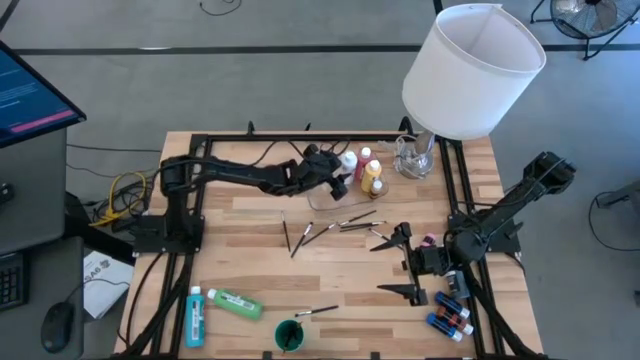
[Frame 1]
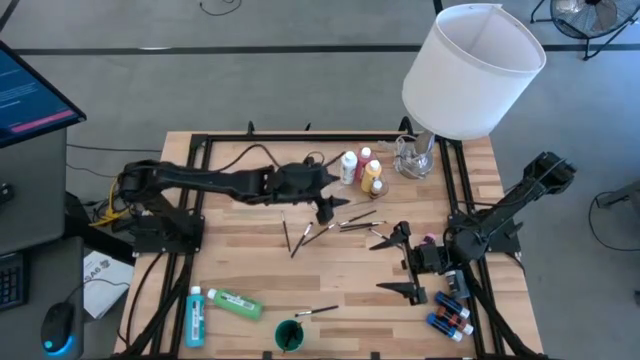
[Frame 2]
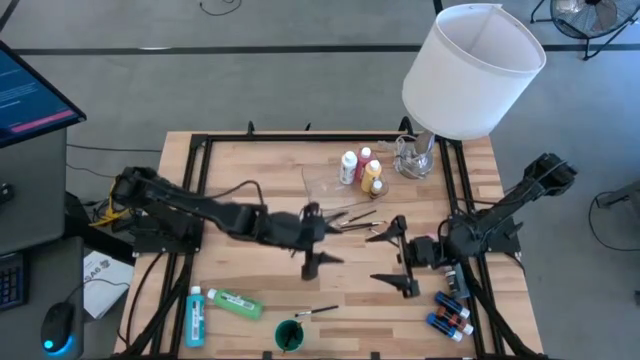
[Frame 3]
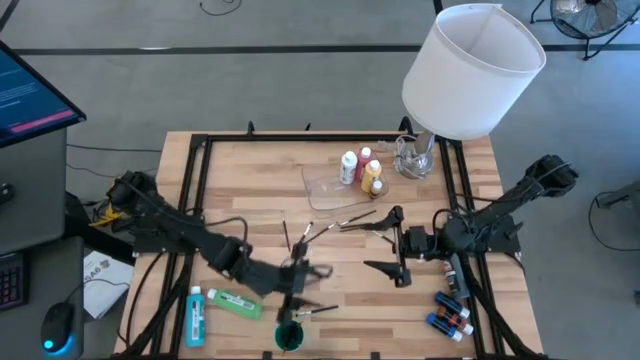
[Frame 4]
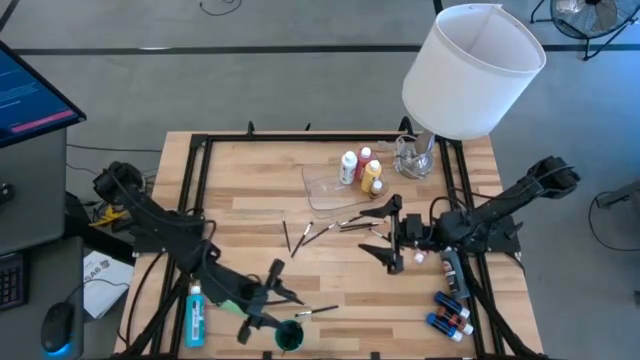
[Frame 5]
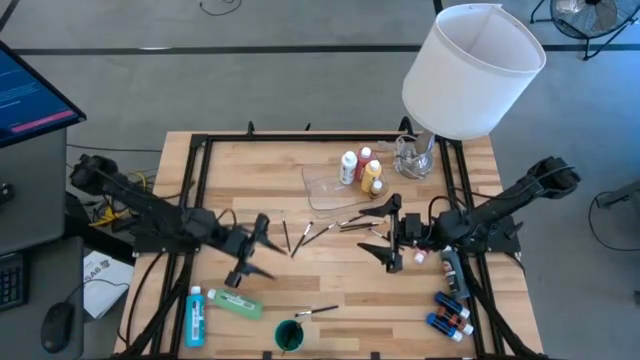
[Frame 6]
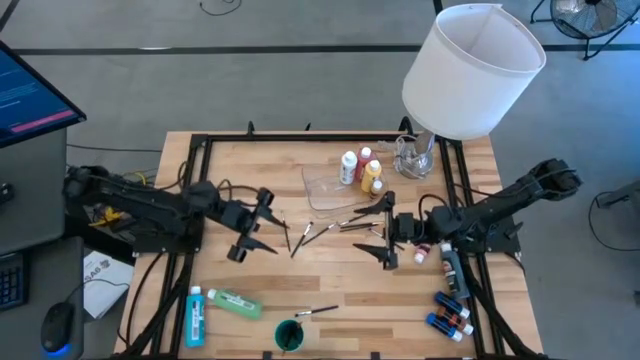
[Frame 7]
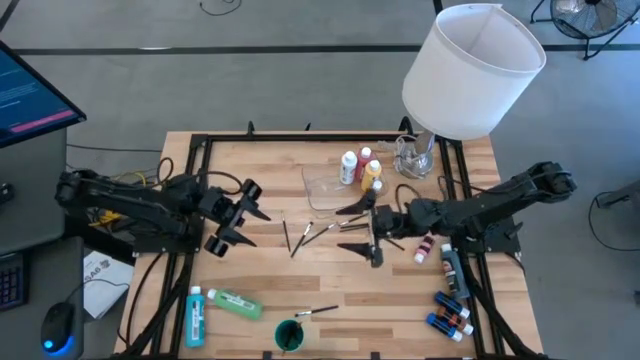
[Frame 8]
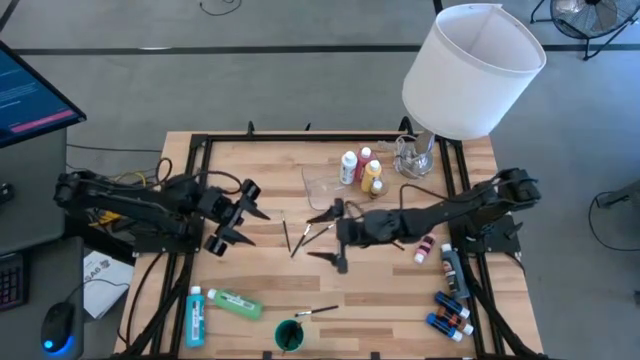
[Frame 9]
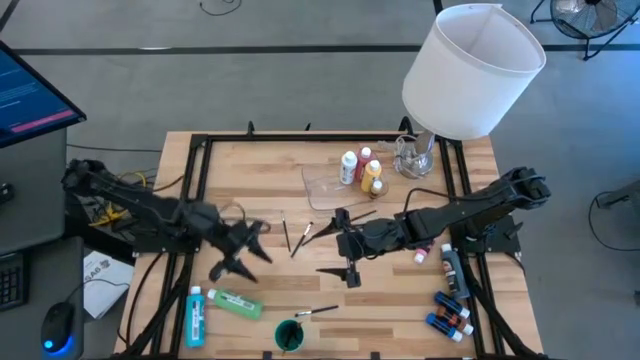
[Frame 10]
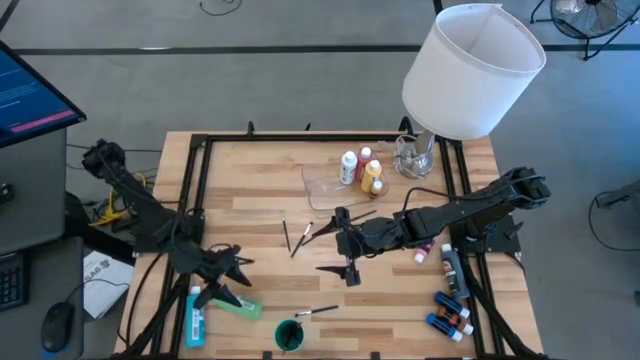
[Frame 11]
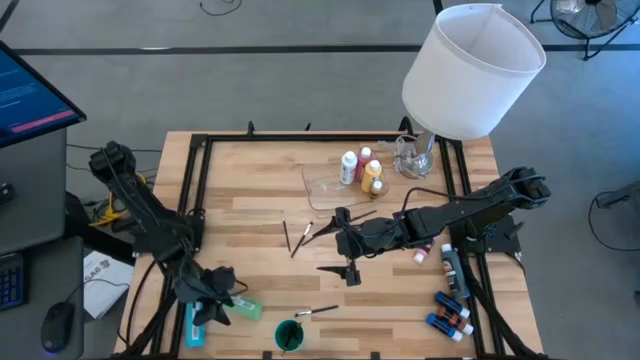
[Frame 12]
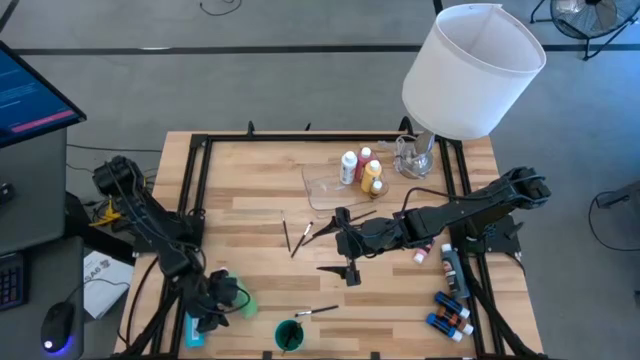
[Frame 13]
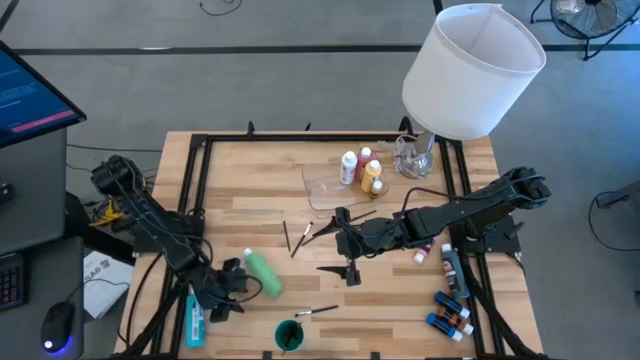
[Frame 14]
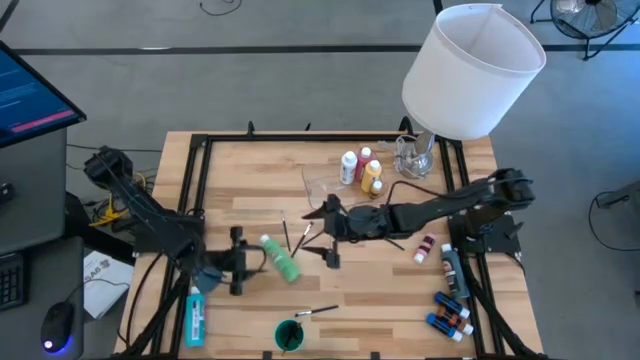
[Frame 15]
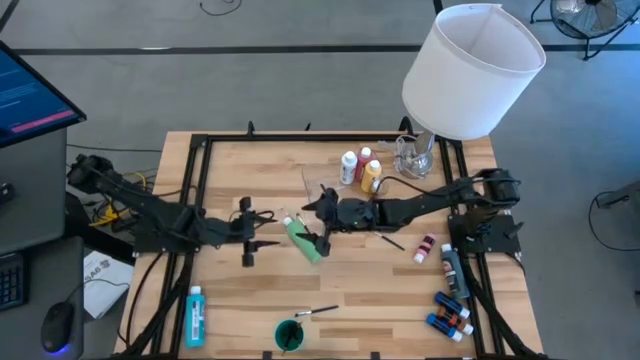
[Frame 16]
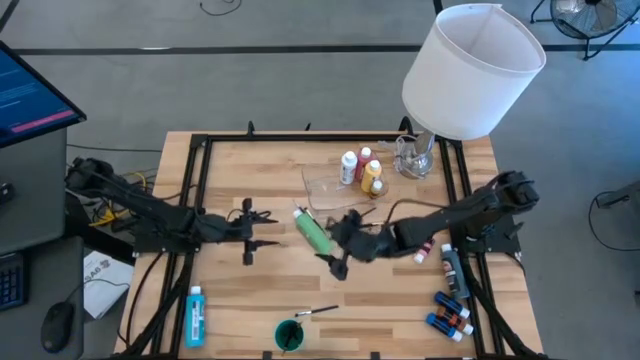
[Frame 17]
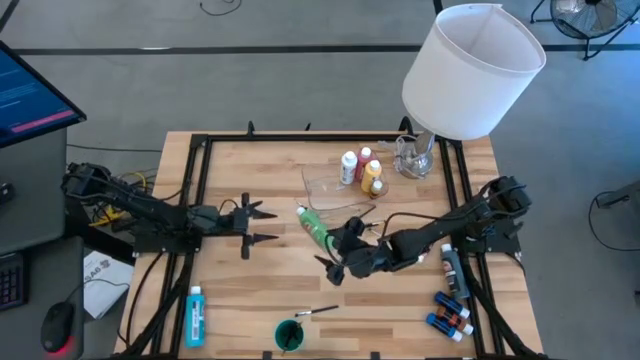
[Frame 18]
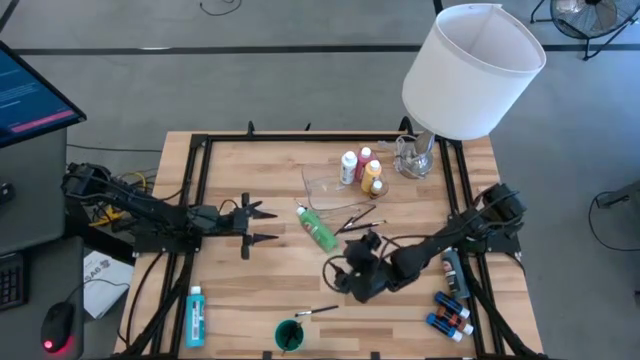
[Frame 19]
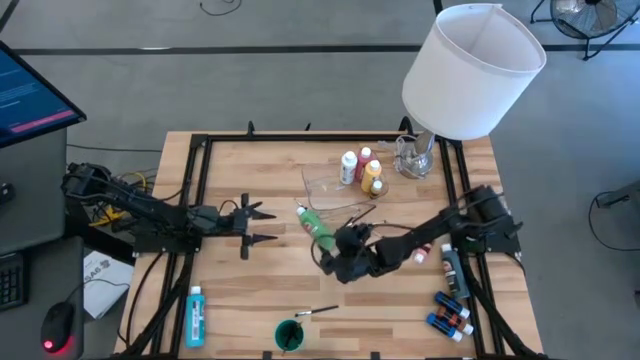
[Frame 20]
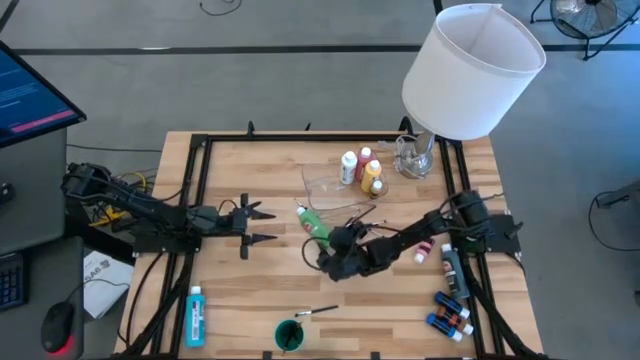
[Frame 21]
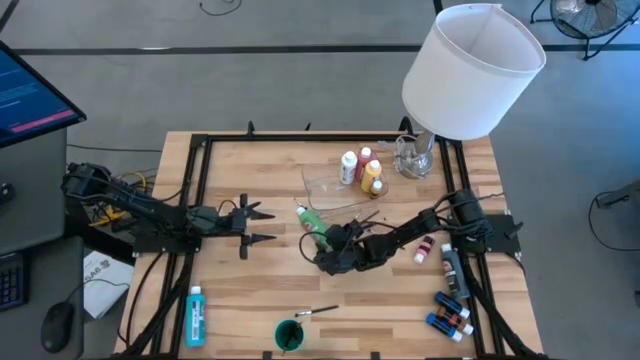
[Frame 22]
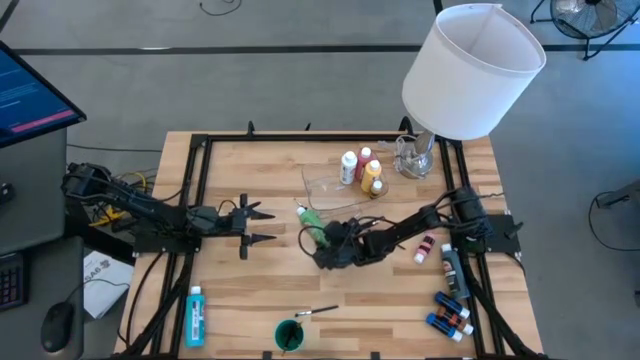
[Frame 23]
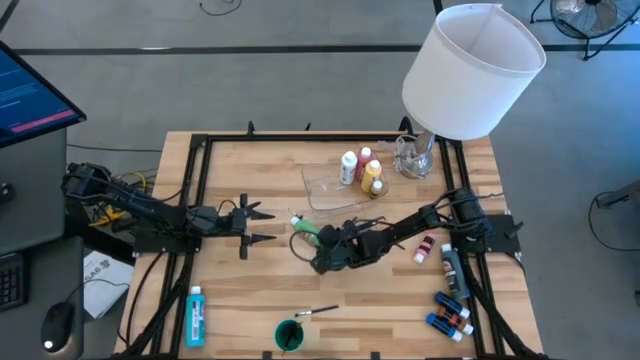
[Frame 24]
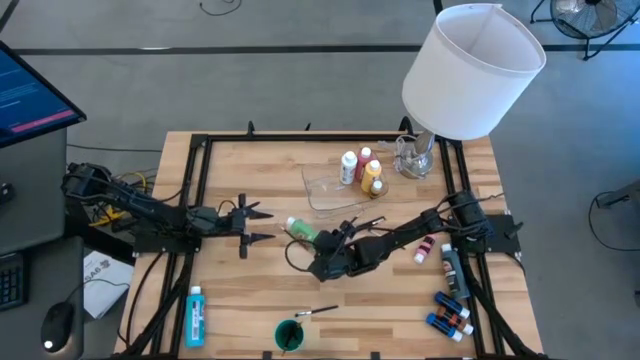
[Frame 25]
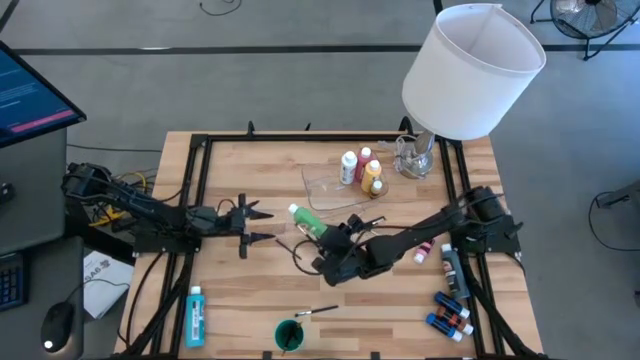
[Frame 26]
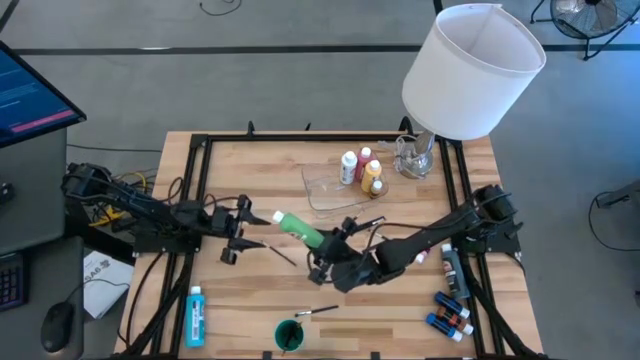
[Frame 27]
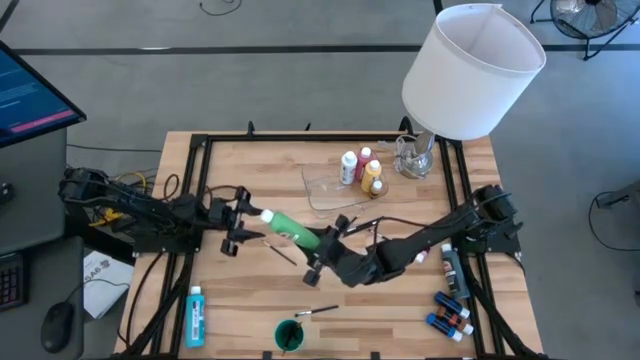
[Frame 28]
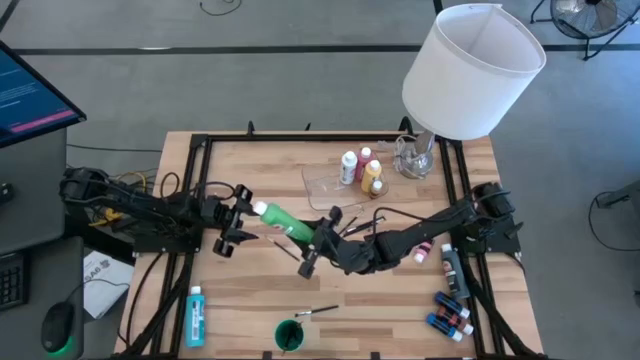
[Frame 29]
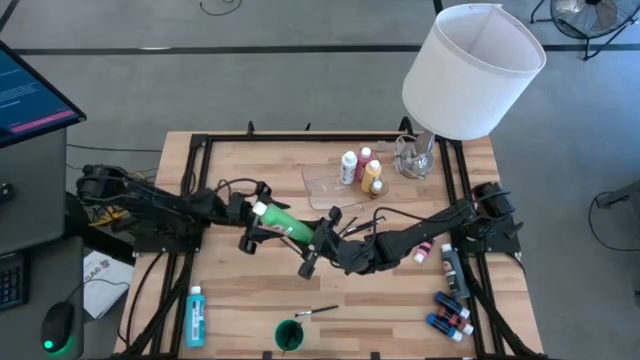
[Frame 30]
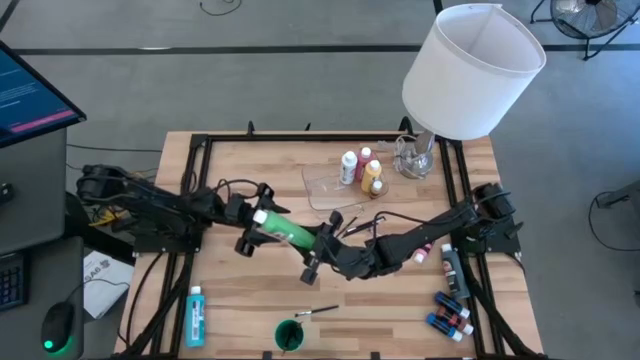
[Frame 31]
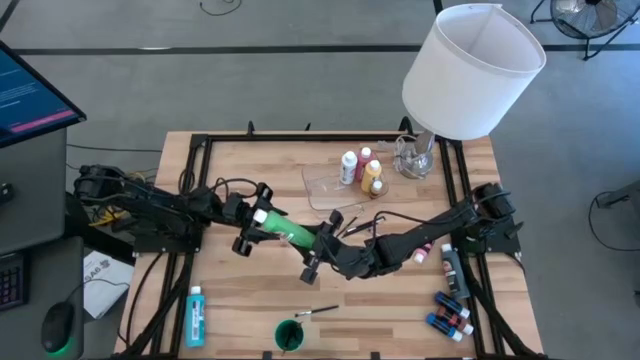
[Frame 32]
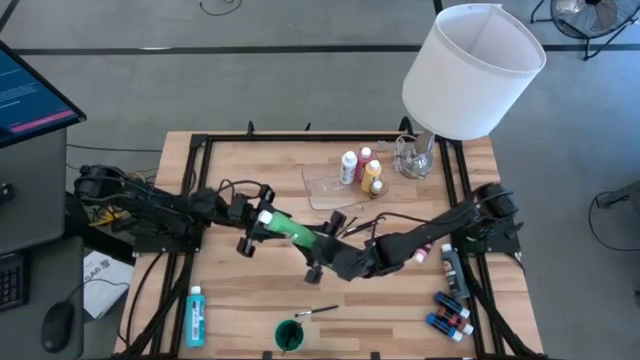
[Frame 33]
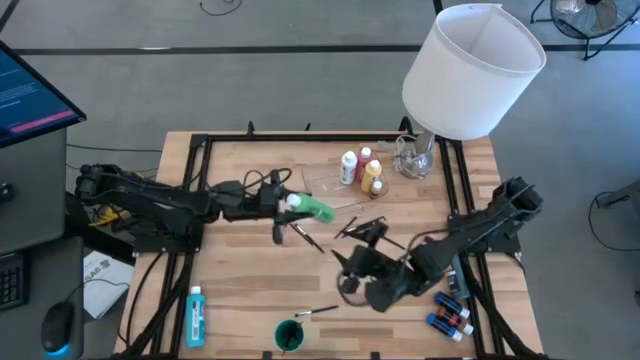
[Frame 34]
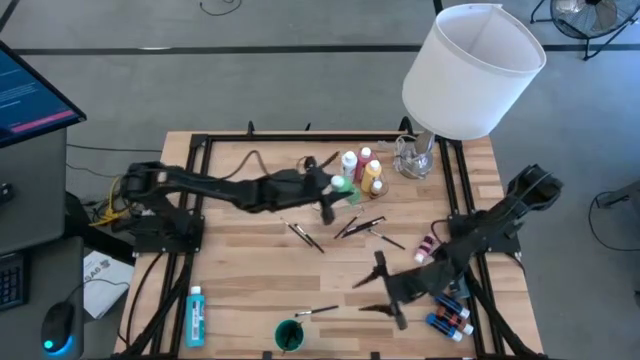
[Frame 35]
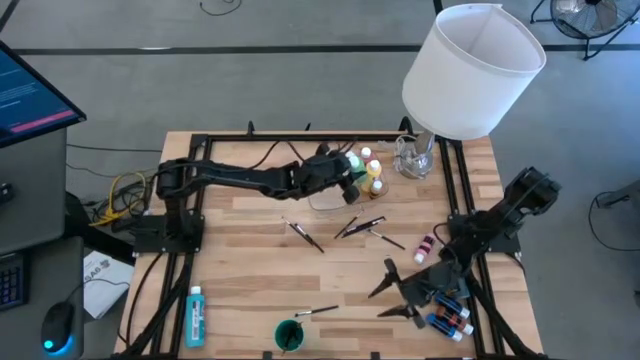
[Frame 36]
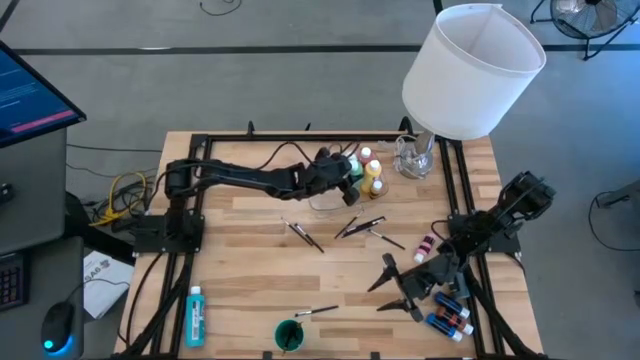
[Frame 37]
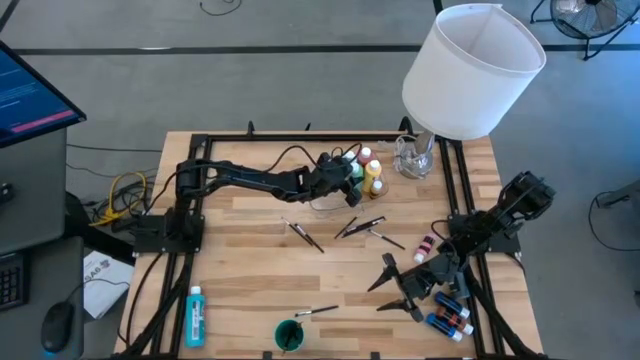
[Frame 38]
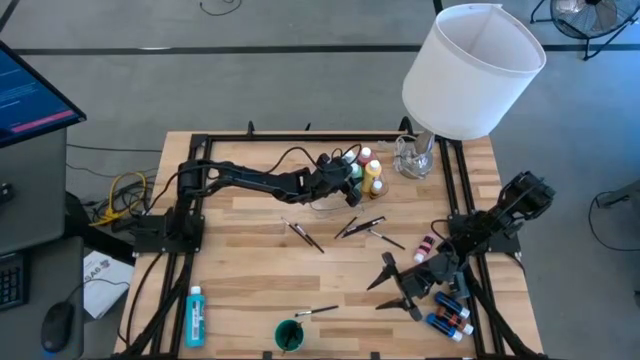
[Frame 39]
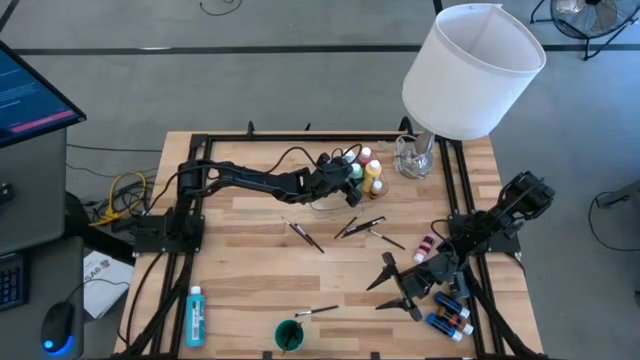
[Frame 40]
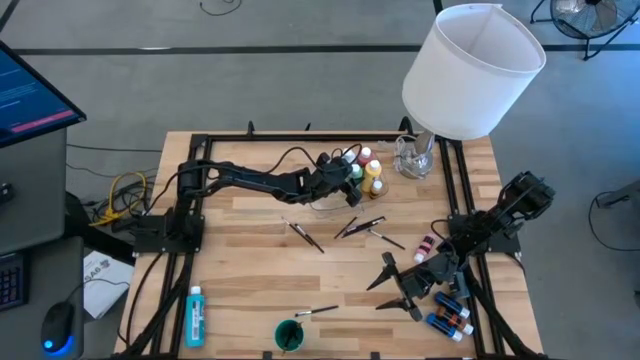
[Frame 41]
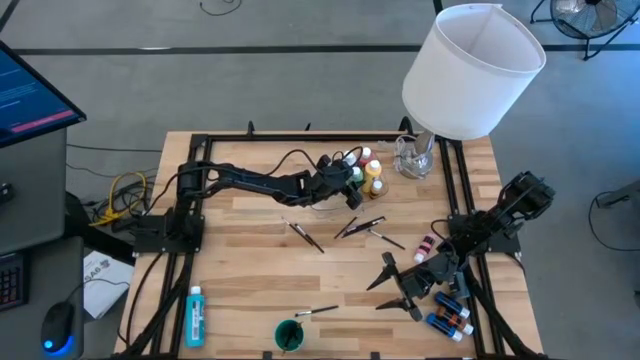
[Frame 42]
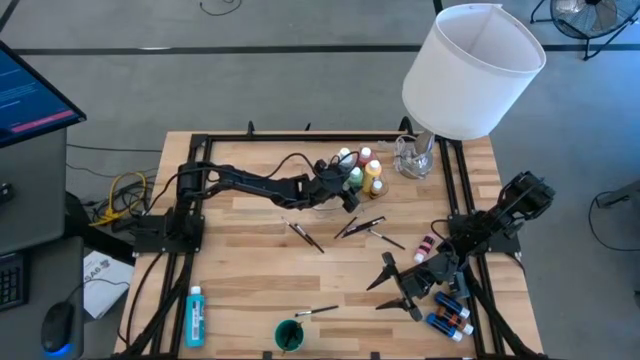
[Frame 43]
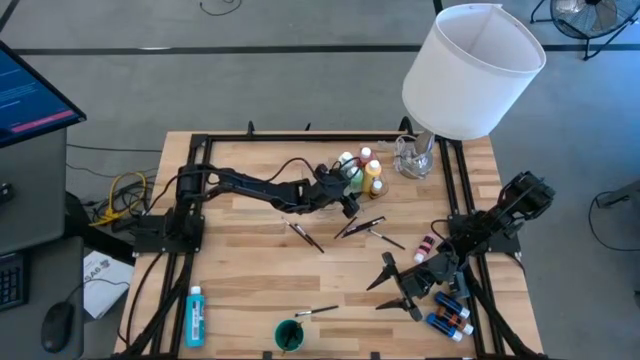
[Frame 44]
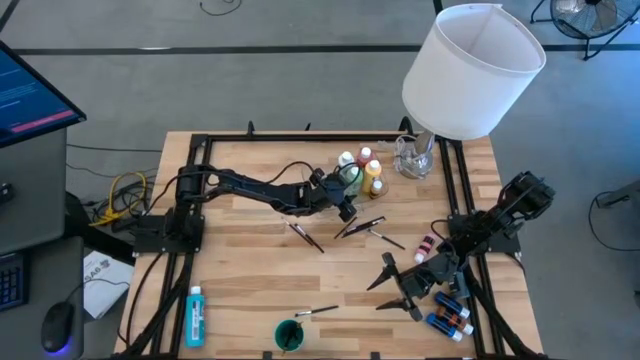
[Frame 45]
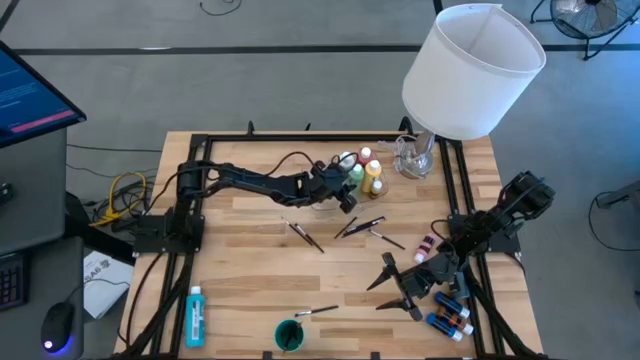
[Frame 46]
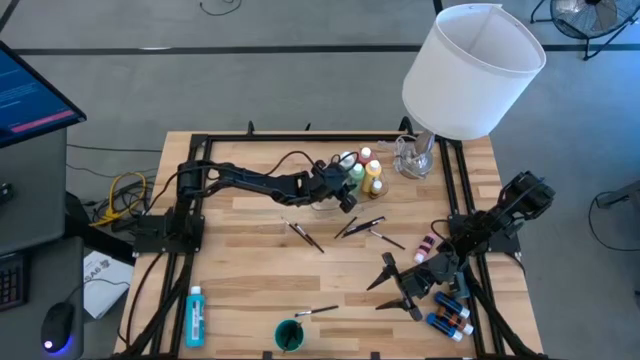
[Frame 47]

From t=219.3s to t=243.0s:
Task: Pick & Place Paint Supplies
Put the big green paint bottle into the transparent bin
